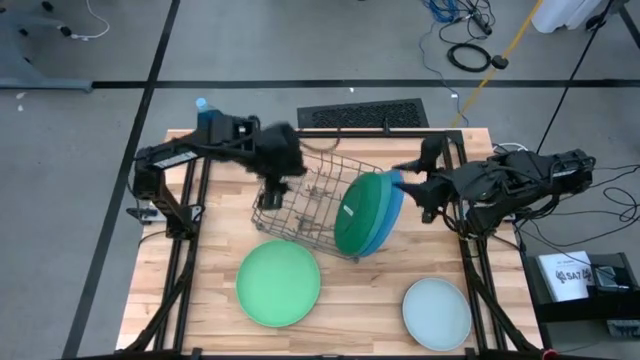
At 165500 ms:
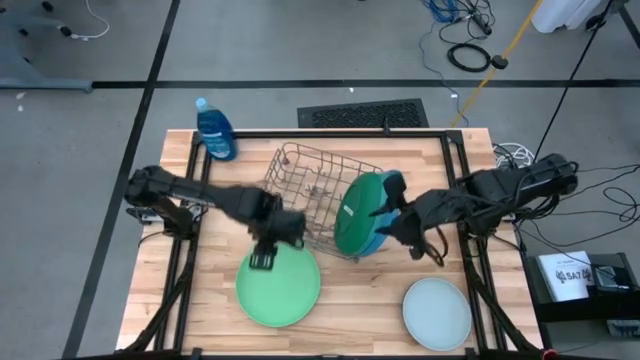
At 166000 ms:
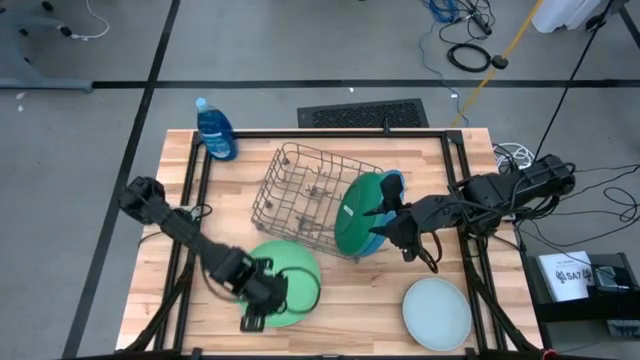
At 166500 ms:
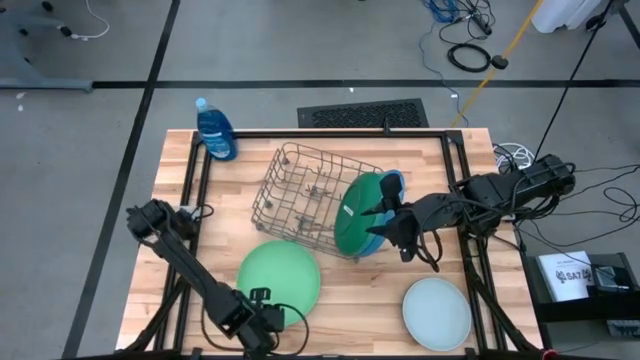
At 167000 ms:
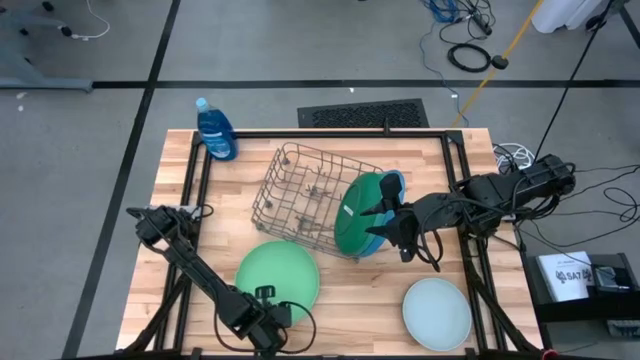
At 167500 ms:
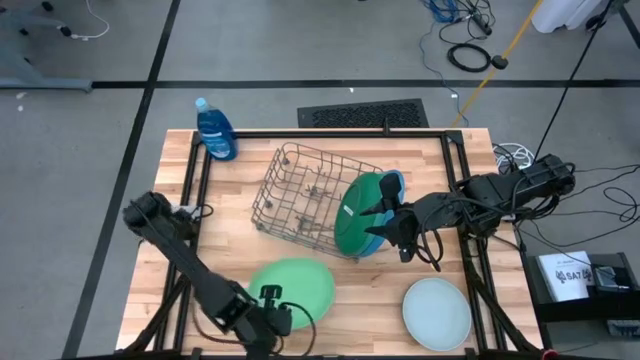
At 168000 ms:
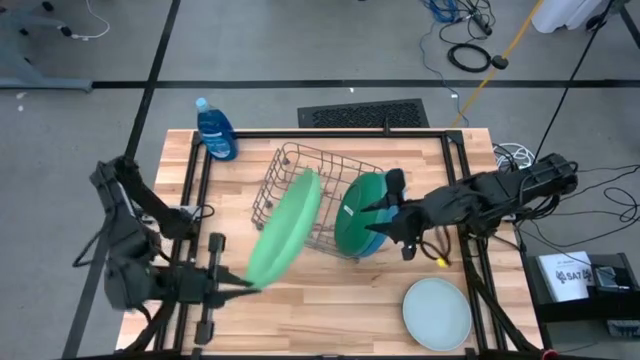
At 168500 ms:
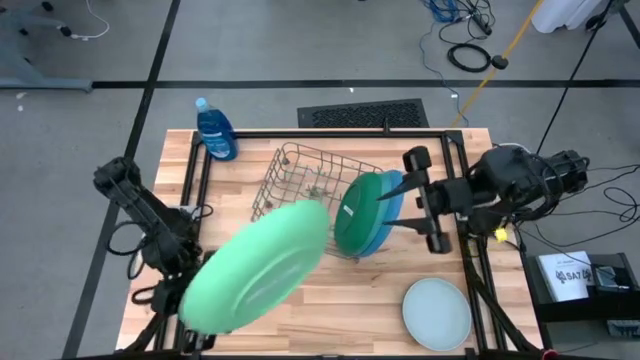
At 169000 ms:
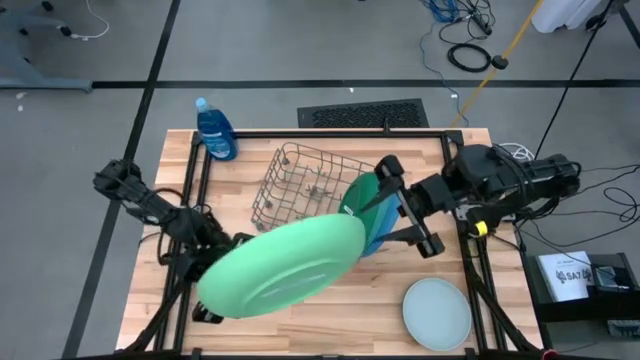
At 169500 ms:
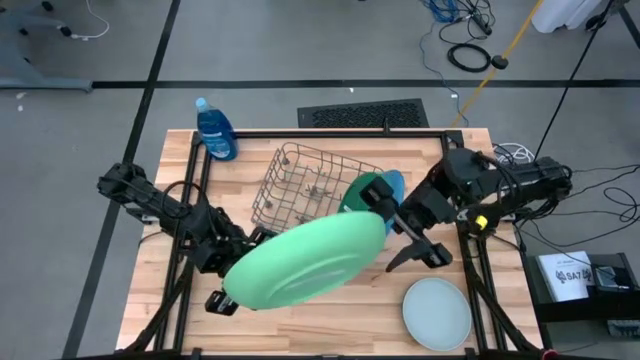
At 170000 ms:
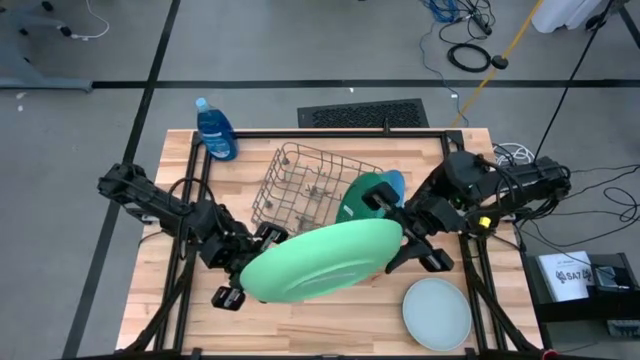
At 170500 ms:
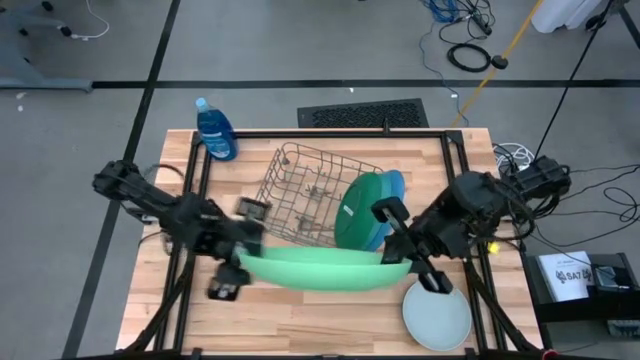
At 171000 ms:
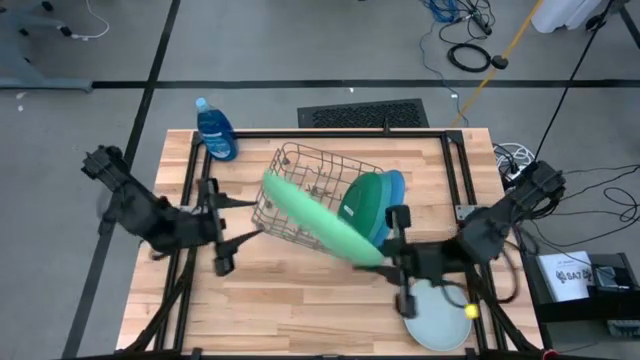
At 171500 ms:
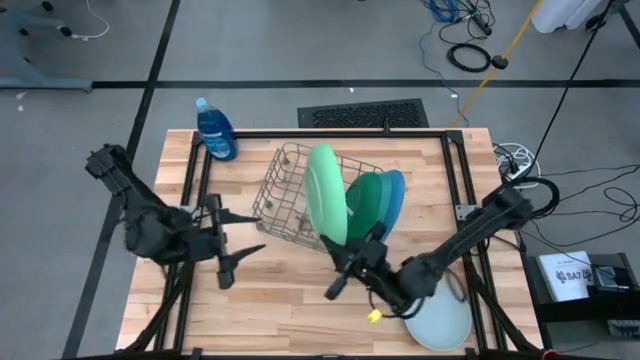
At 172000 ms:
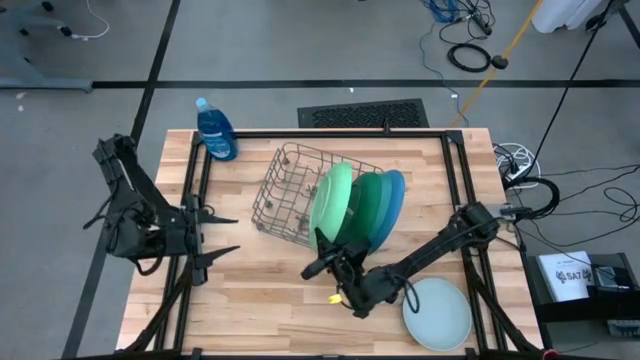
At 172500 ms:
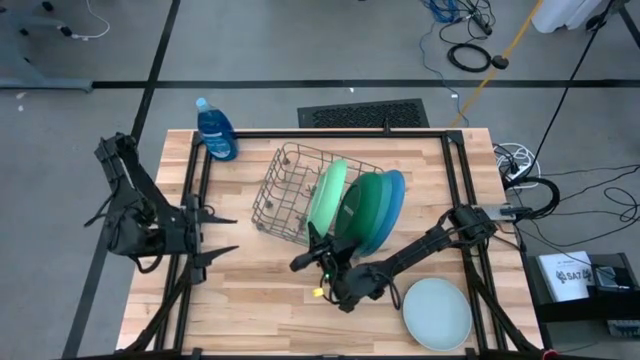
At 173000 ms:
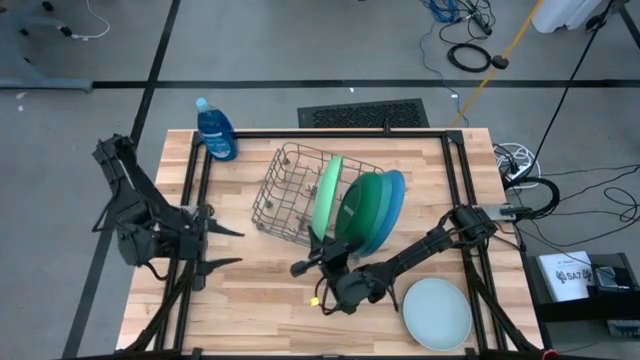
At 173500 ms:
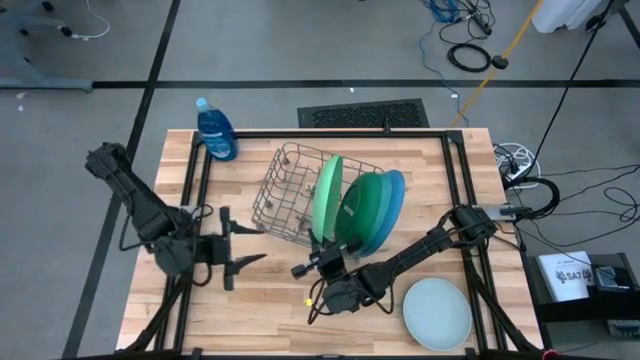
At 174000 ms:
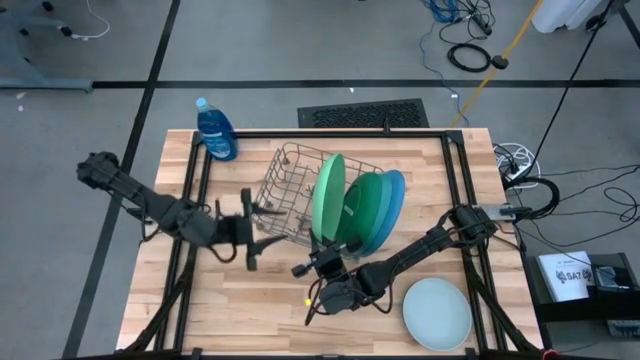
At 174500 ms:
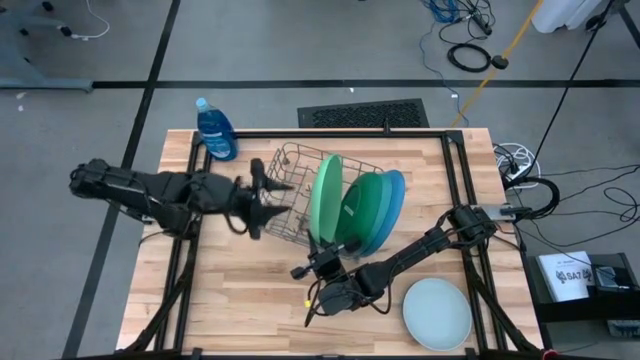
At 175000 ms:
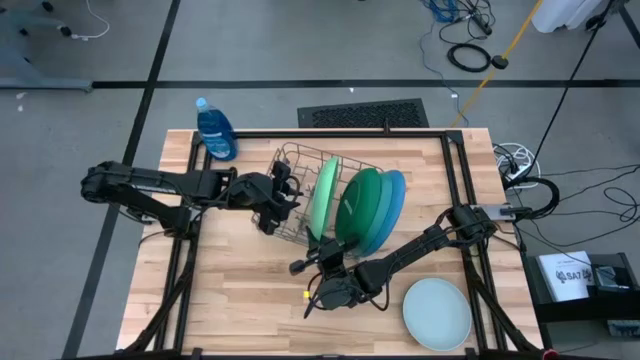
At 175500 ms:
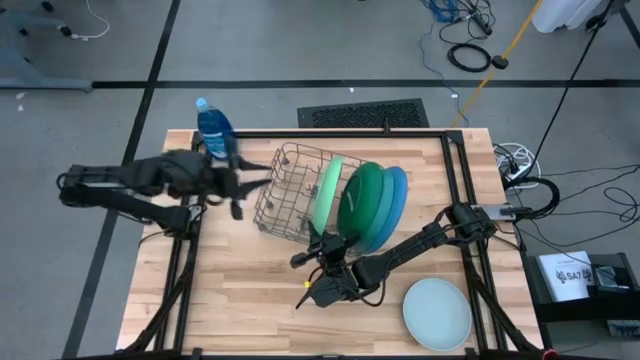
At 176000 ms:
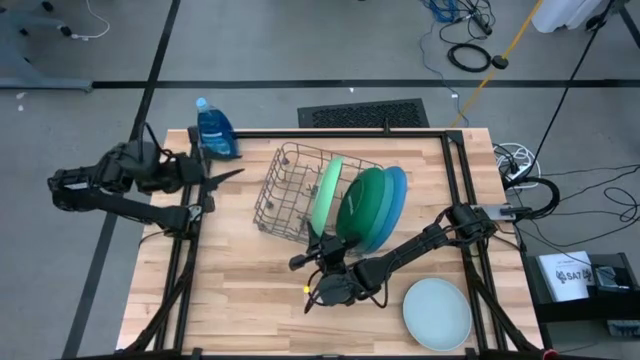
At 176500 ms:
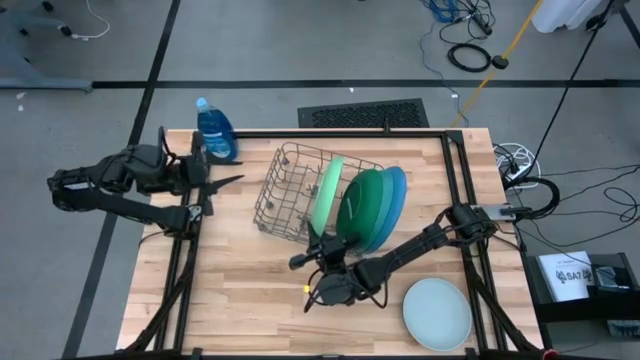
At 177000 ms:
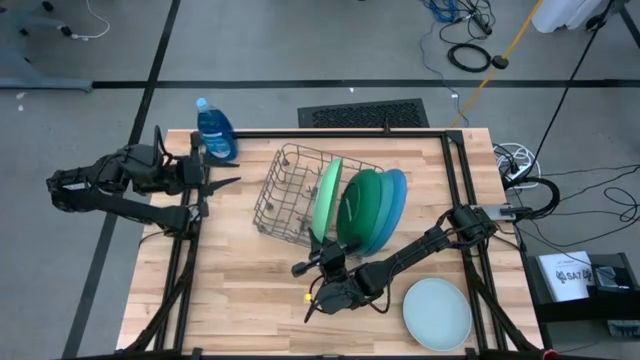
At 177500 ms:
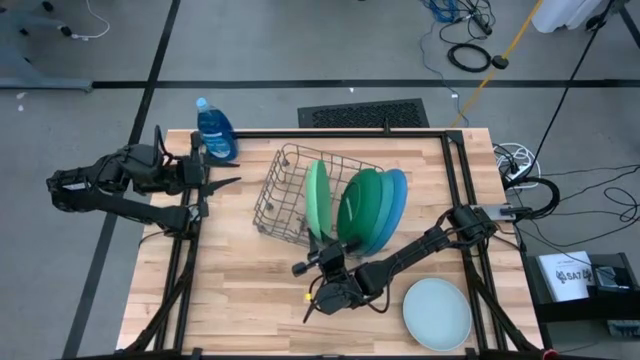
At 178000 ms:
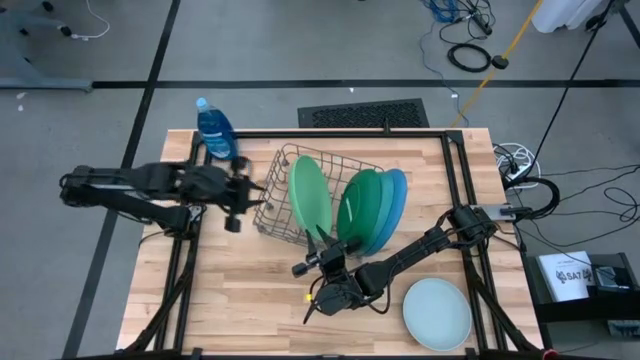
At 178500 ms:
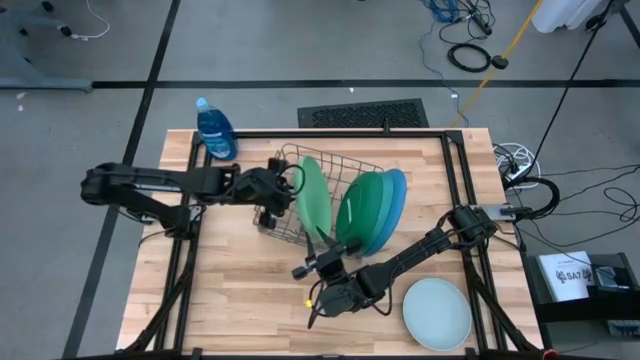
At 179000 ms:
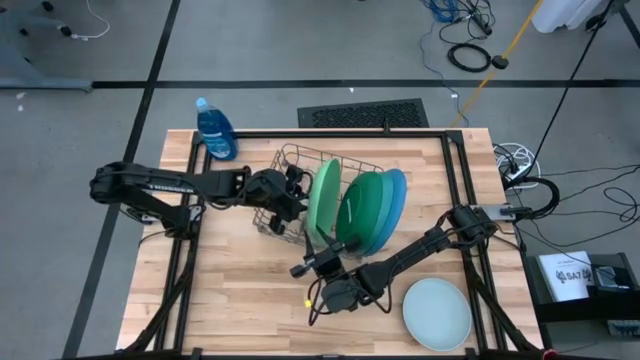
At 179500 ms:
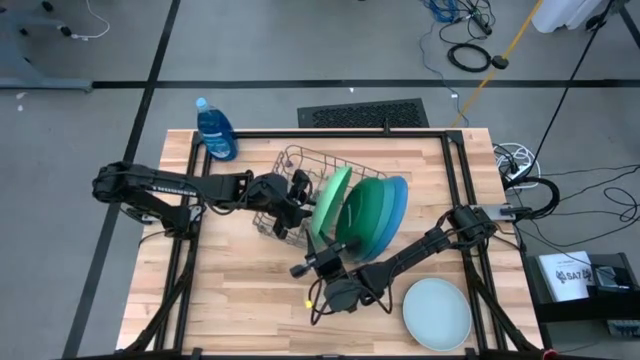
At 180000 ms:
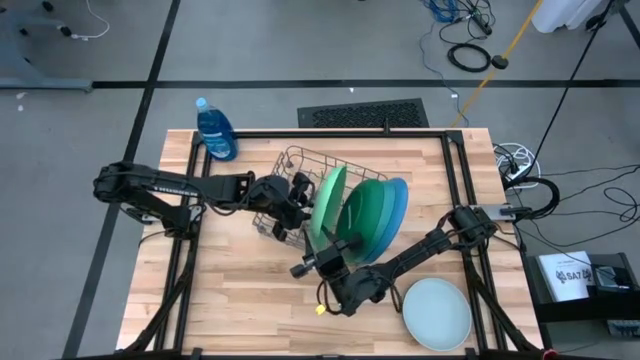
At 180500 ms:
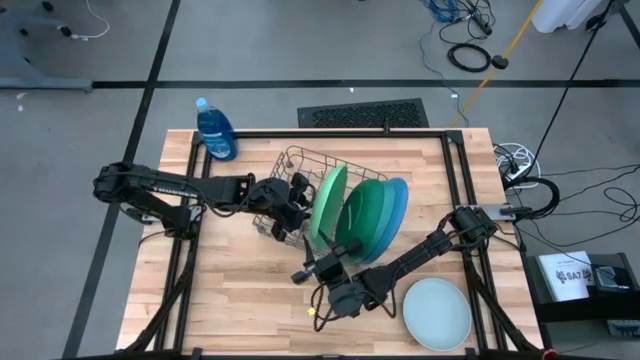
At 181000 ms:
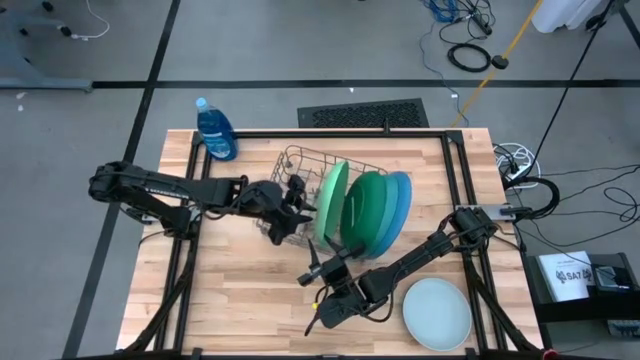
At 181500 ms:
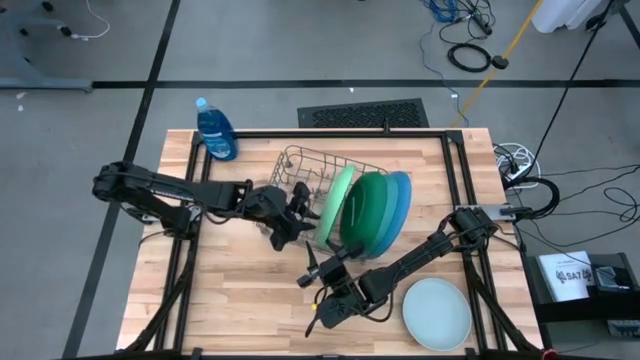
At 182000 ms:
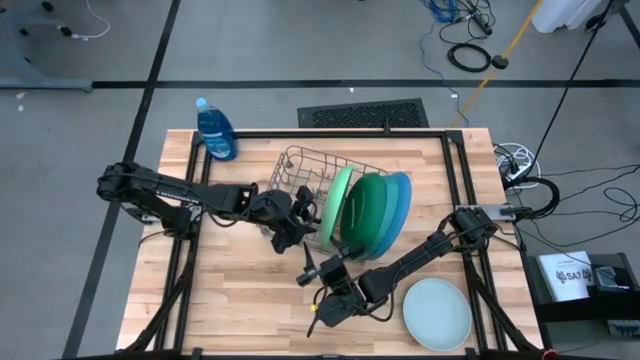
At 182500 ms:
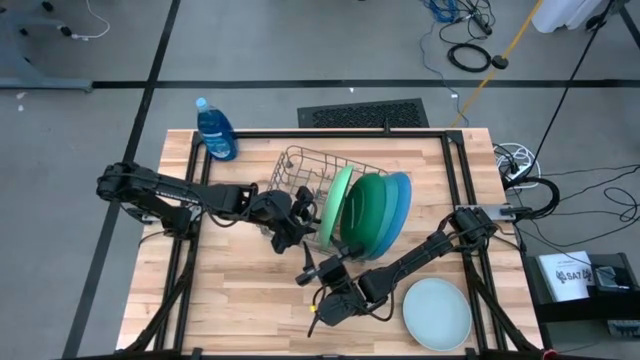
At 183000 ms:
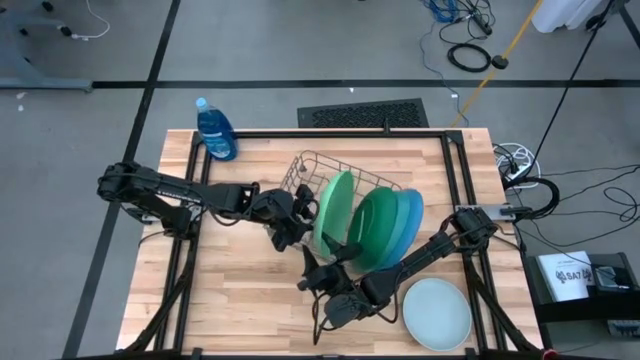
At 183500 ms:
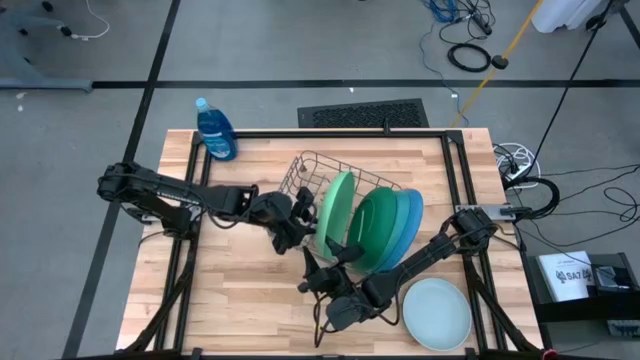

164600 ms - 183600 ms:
Task: Sort dishes
Put the light green plate into the dish rack

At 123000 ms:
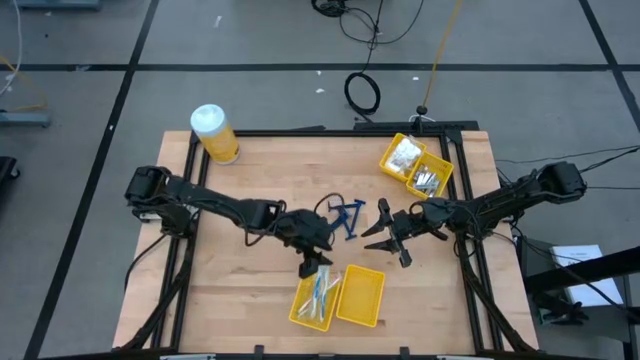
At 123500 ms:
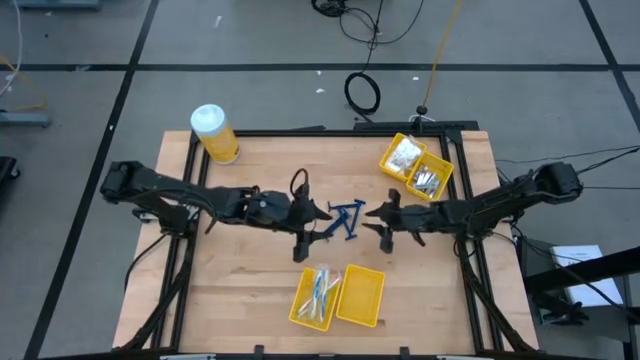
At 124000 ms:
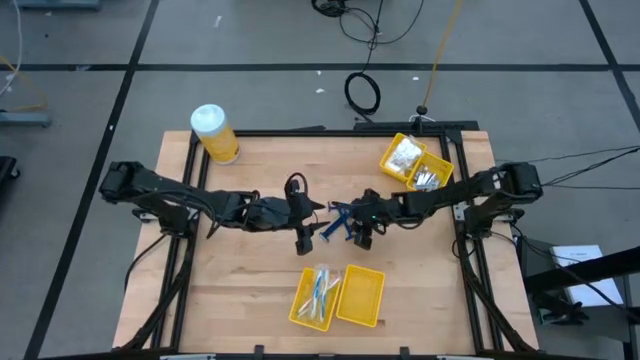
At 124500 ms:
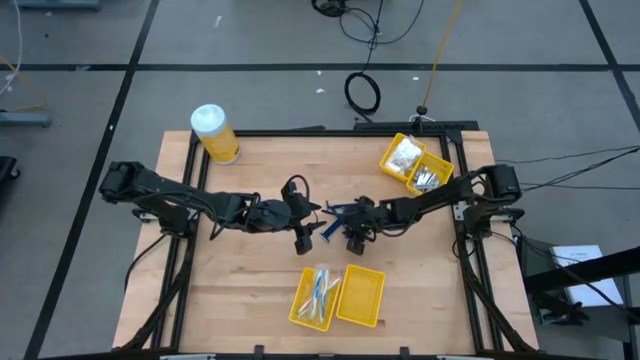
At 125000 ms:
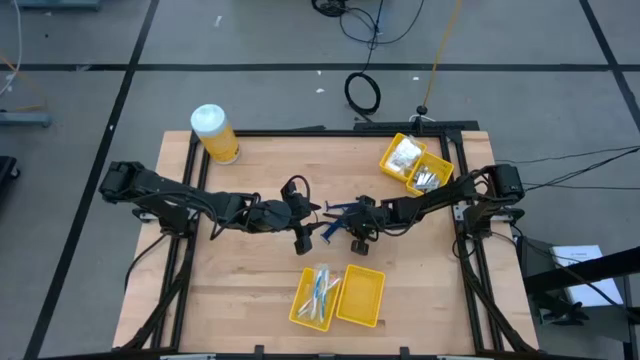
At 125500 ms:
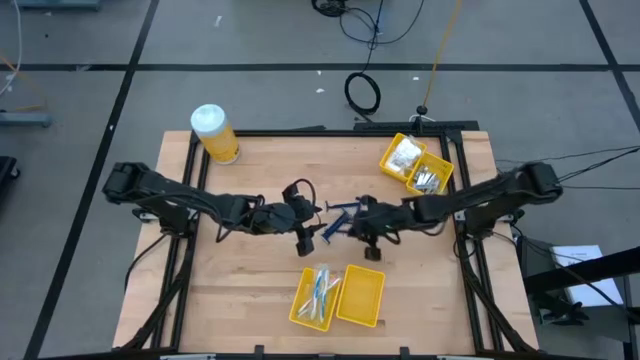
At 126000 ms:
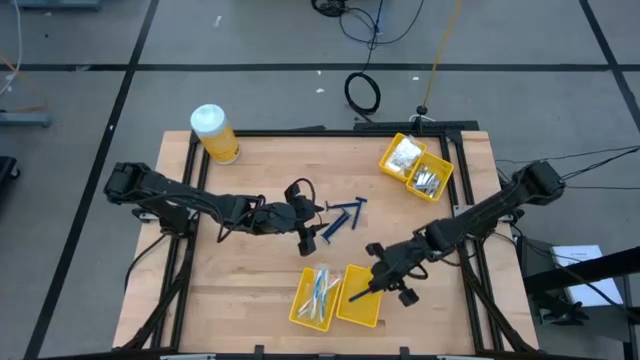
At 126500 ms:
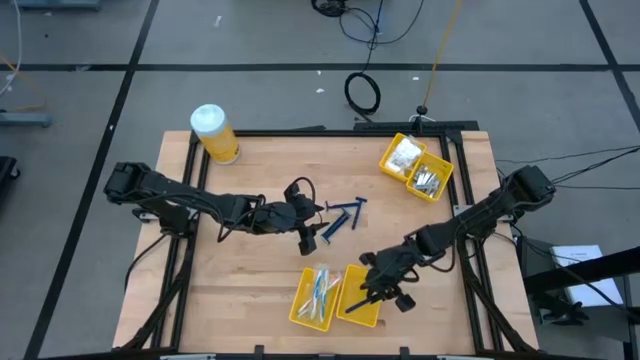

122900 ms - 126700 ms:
Task: Pick & Place Travel size toiletries
Put the blue rolled gauze into the bottom right yellow bin
